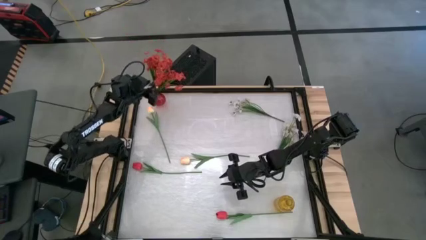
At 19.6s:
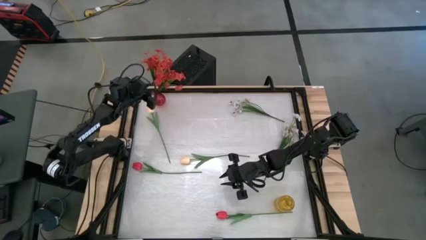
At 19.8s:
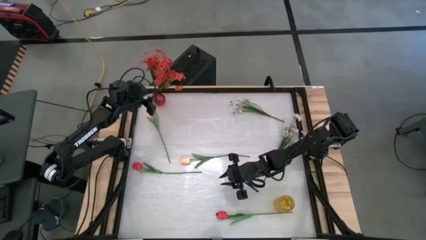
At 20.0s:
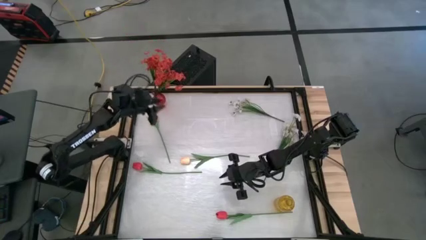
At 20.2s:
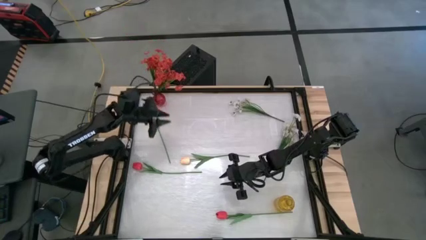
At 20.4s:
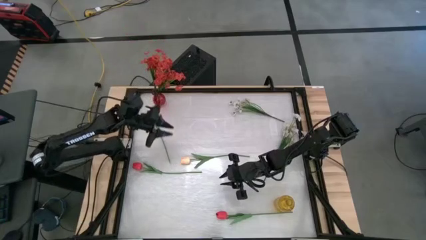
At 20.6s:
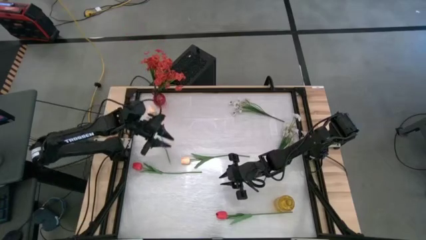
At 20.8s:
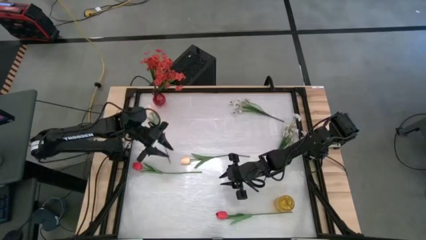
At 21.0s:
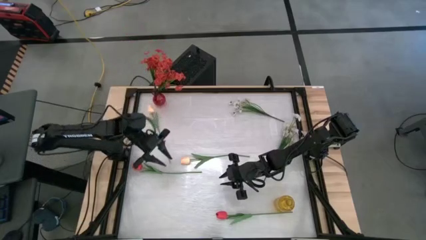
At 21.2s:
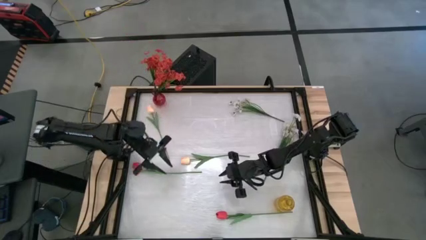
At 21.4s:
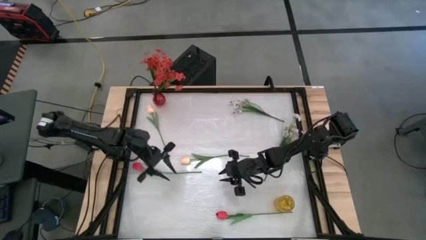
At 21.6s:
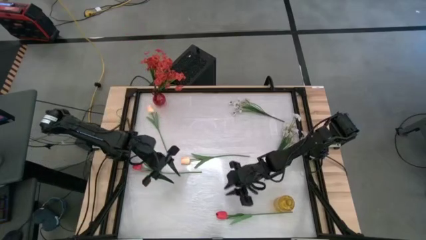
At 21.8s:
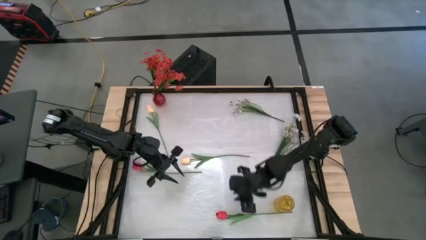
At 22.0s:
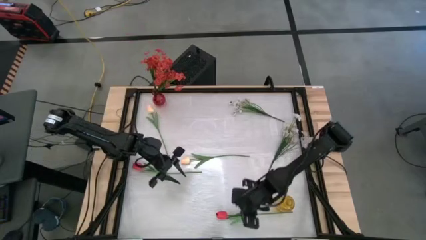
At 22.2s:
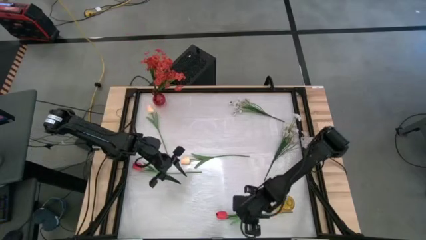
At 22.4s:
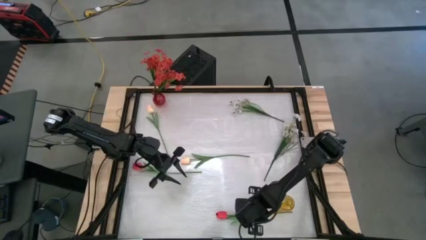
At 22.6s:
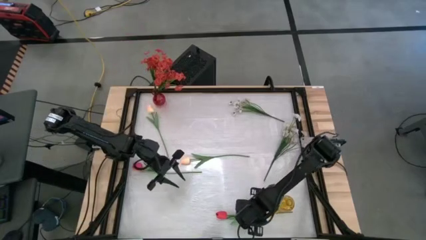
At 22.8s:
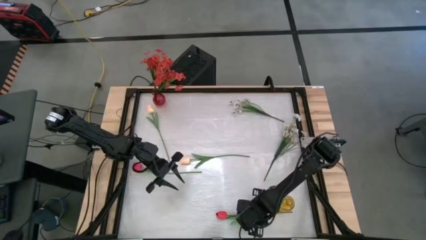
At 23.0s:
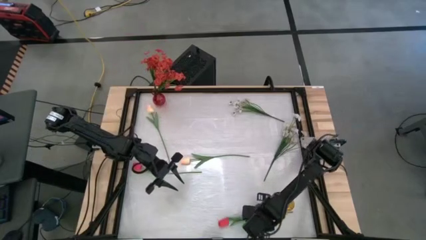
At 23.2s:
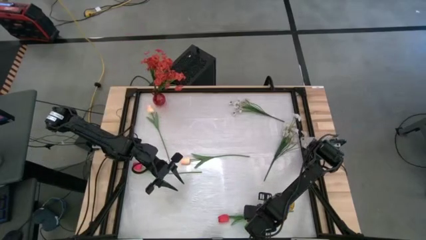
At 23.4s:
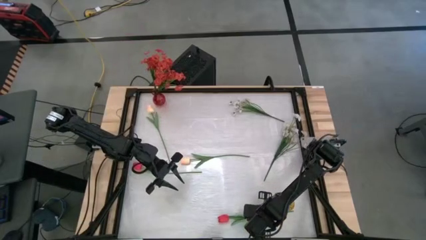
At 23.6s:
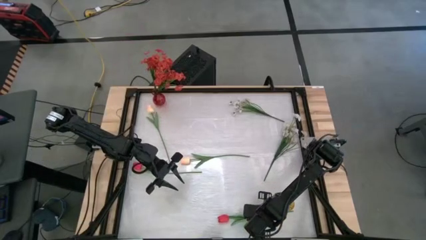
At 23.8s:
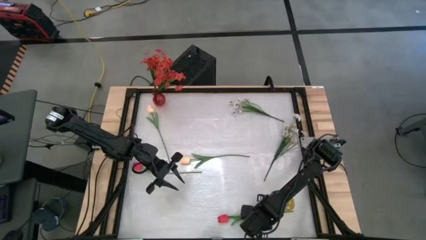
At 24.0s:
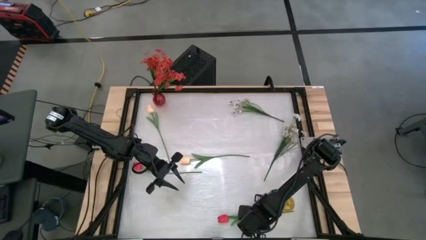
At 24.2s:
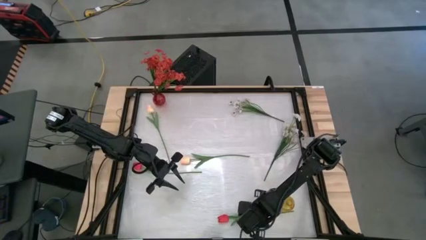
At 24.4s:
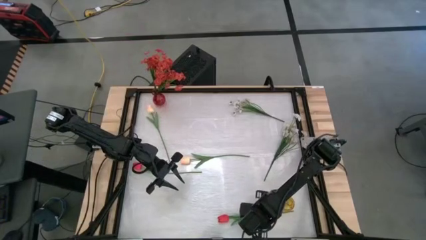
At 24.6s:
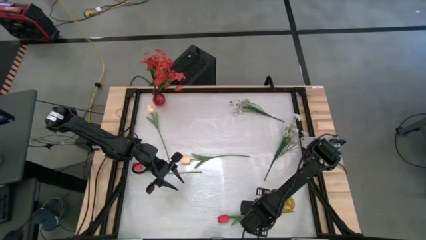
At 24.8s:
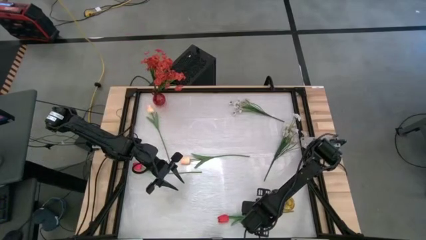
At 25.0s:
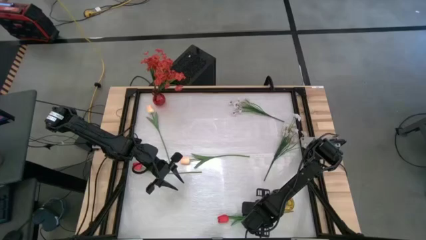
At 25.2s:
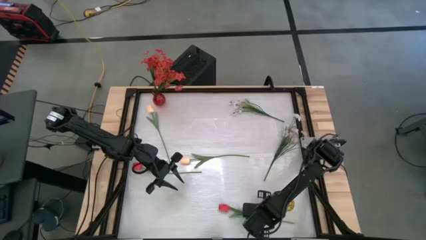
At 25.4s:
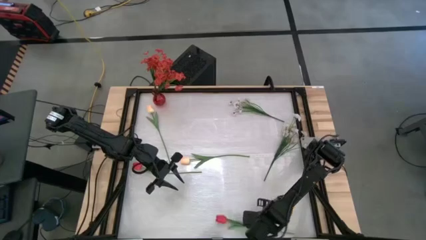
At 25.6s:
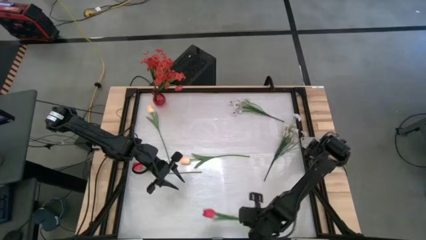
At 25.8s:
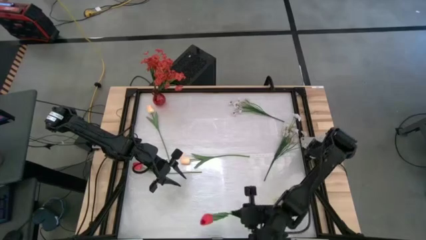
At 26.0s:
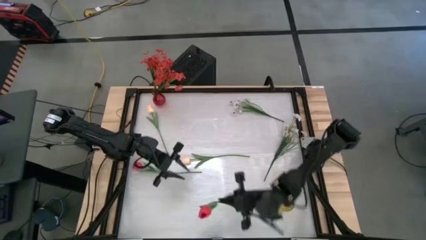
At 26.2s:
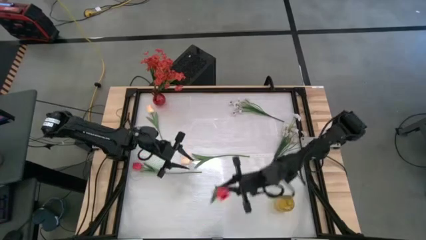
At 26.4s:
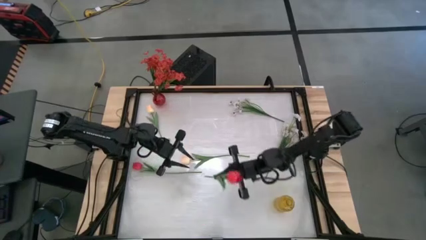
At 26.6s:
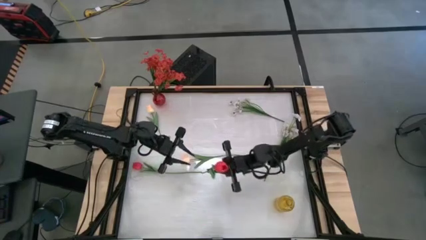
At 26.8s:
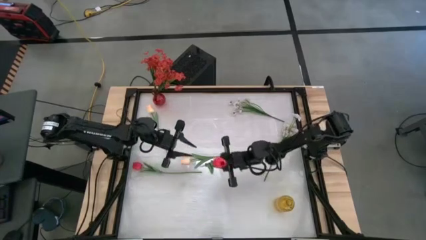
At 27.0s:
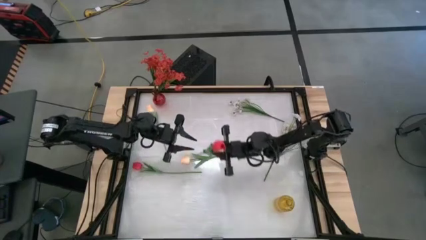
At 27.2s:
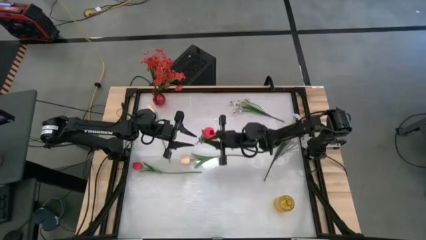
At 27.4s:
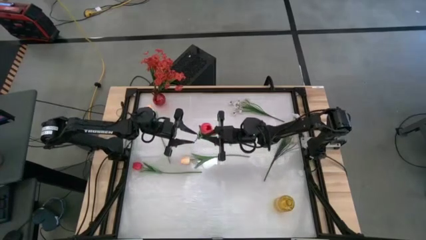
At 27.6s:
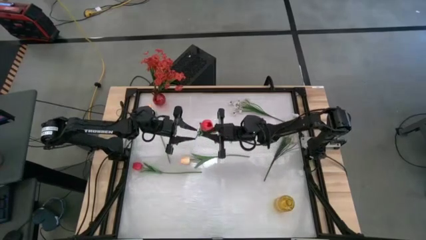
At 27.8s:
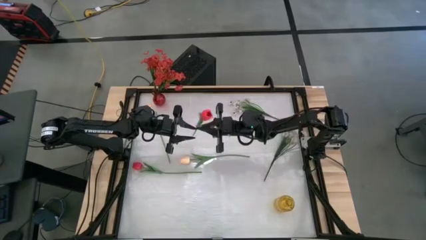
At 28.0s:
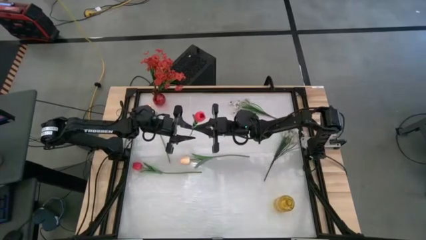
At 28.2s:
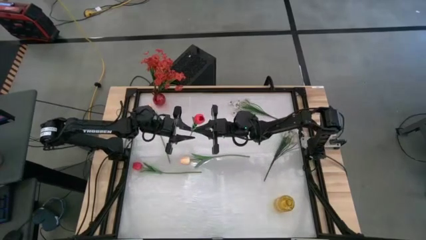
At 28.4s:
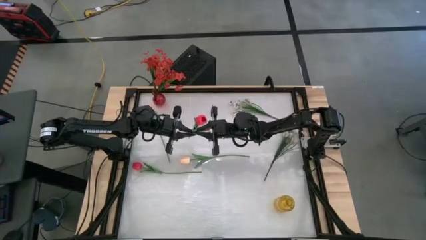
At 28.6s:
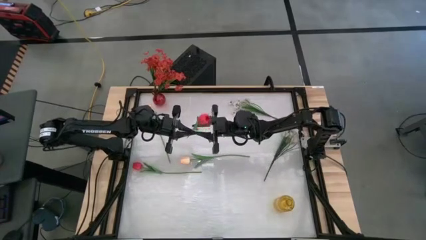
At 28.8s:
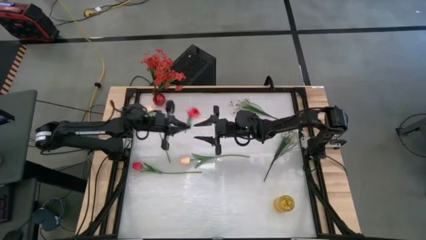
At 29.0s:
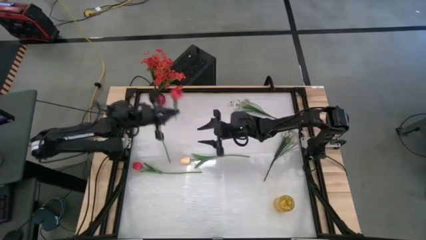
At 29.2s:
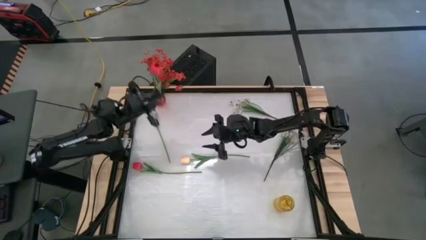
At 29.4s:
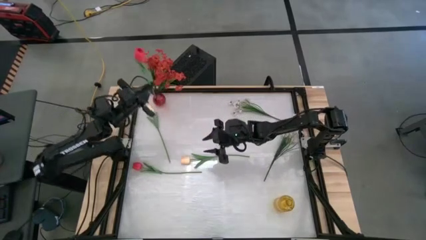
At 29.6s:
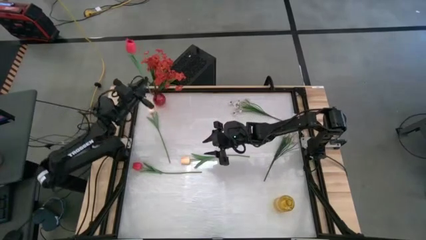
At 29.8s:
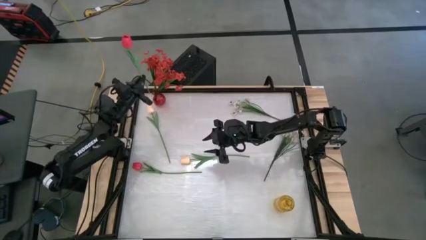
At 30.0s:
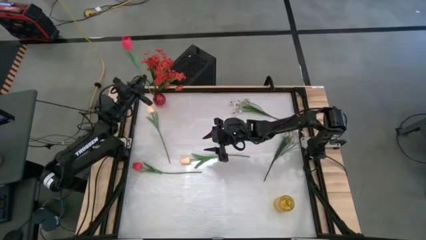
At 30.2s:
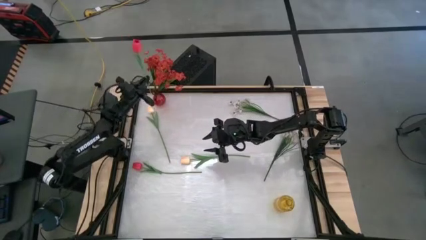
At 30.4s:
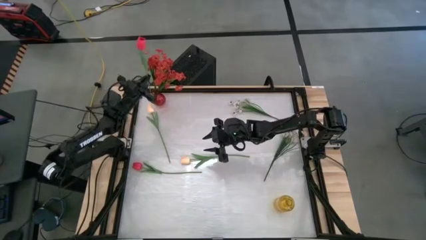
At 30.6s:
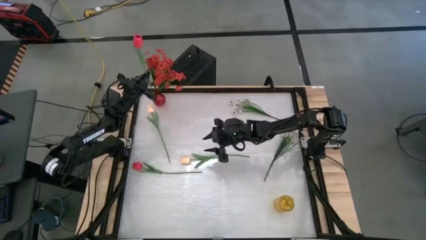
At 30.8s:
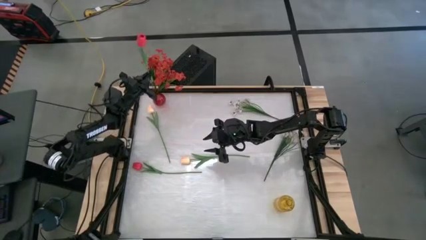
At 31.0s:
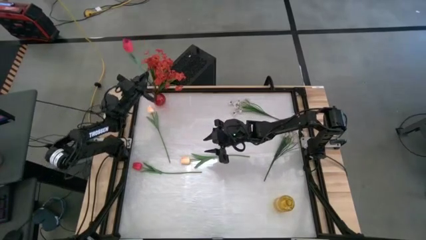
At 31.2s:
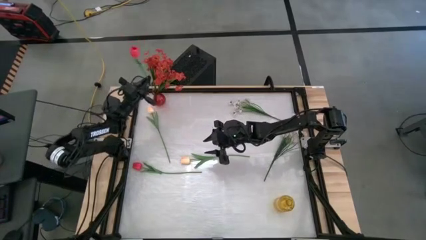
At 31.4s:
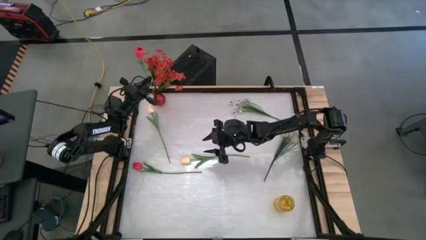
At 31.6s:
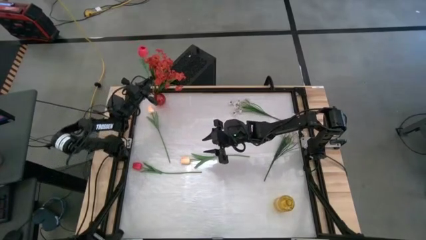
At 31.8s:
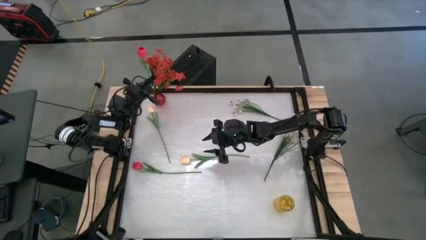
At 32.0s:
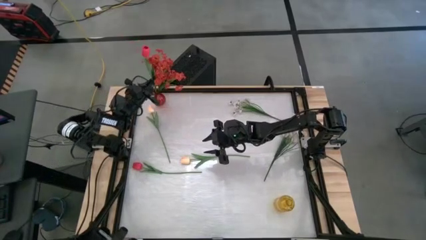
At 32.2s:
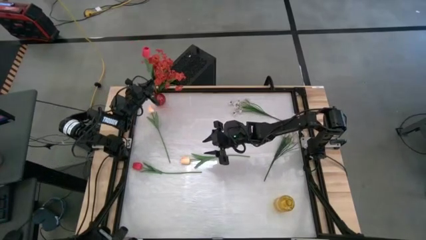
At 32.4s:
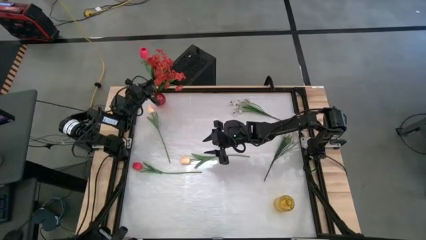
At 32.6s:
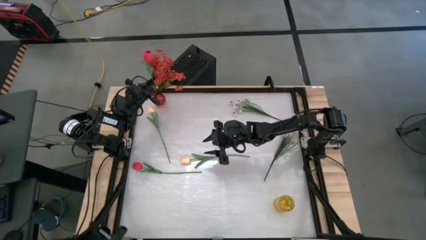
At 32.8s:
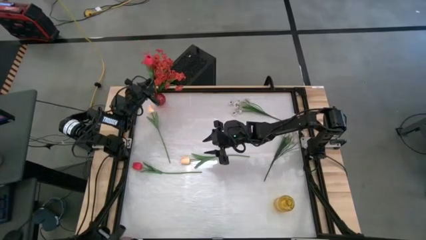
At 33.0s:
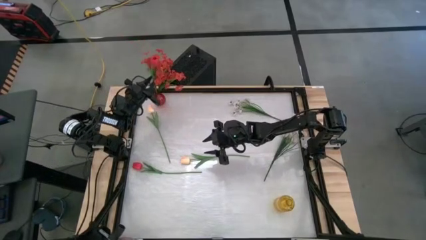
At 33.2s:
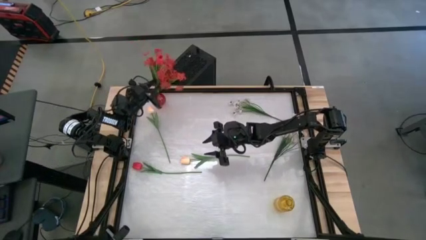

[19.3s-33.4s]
Task: Sort flowers into vase by color
Put the right pink flower into the transparent red vase

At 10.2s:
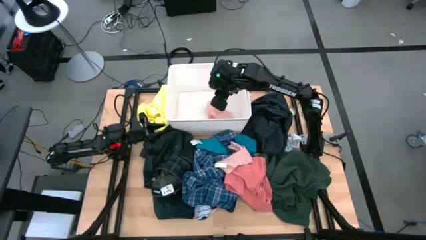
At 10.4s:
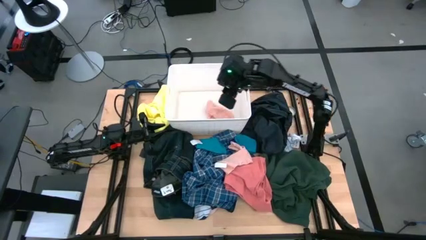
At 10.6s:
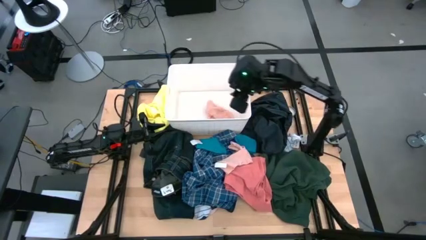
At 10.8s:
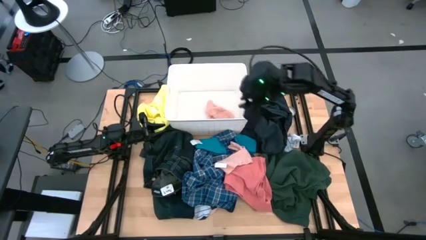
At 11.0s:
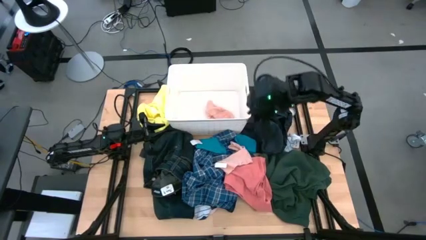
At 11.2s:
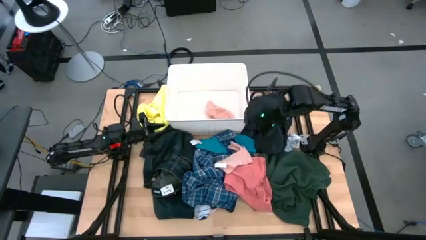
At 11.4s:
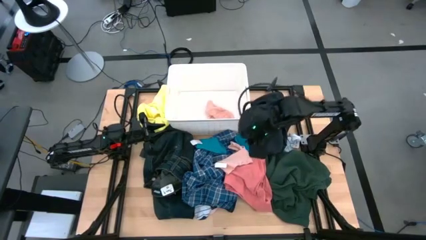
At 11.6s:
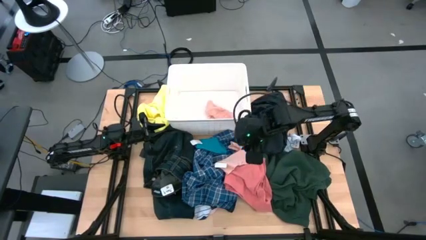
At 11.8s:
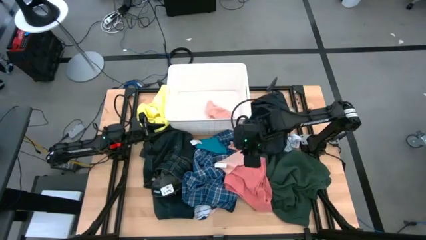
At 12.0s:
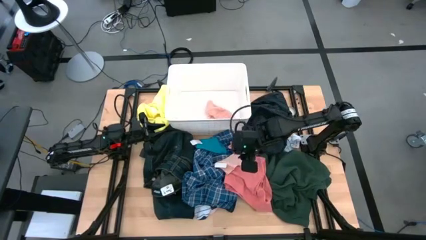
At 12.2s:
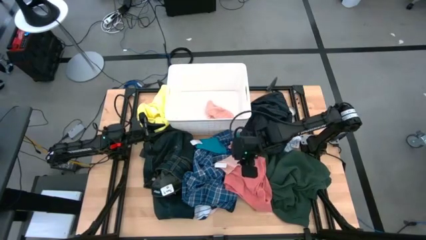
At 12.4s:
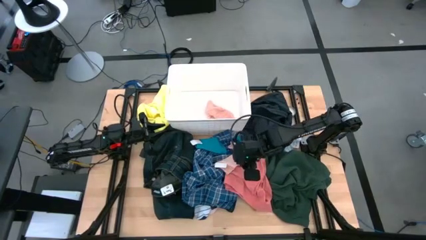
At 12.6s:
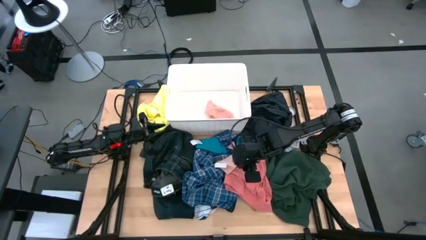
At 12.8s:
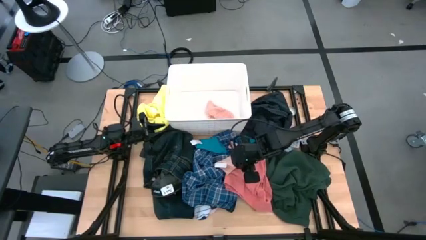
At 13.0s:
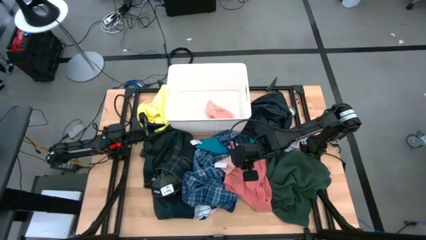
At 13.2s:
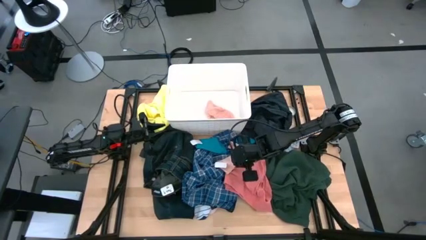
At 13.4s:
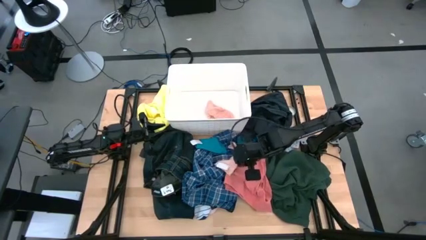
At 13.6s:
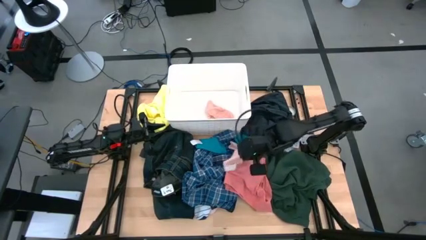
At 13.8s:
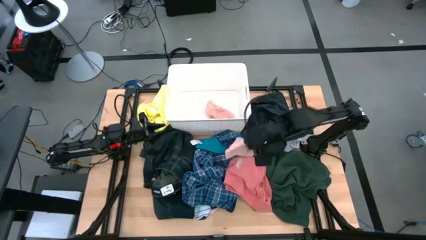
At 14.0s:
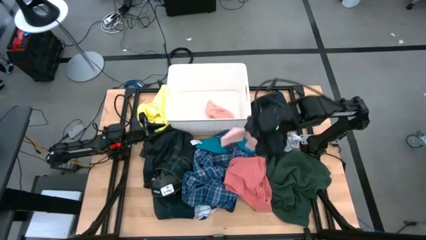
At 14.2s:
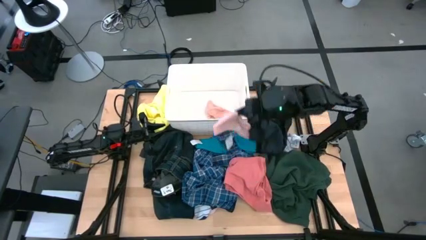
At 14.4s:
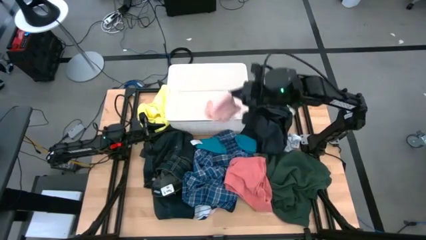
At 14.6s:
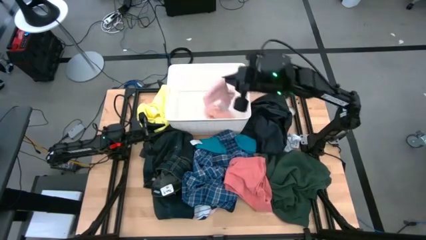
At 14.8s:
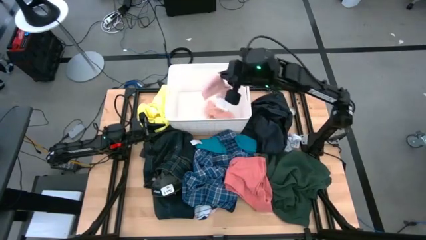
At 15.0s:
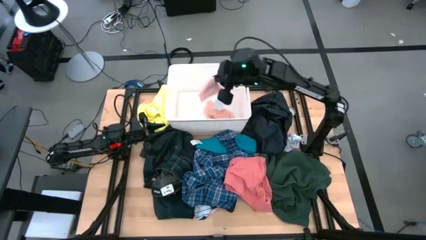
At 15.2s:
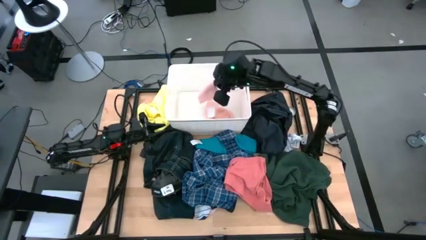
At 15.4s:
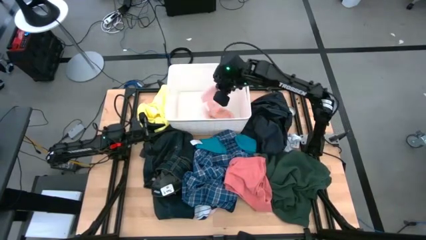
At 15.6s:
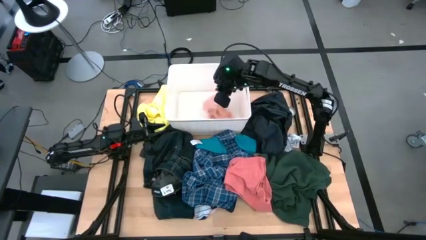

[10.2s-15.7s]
Task: Sort clothes
Put the pink sock into the laundry organizer
